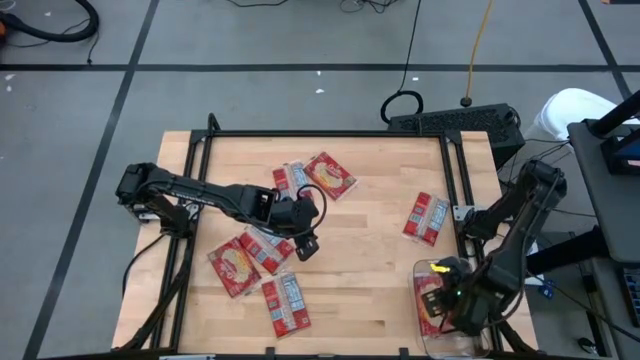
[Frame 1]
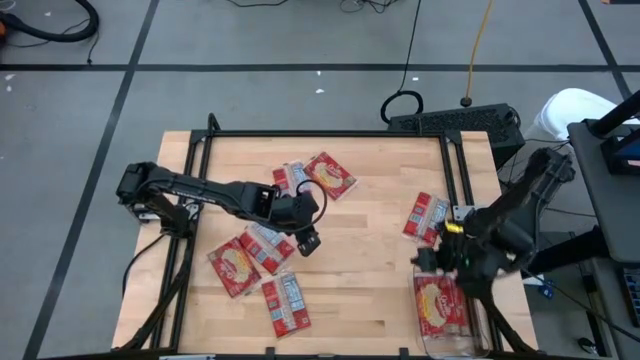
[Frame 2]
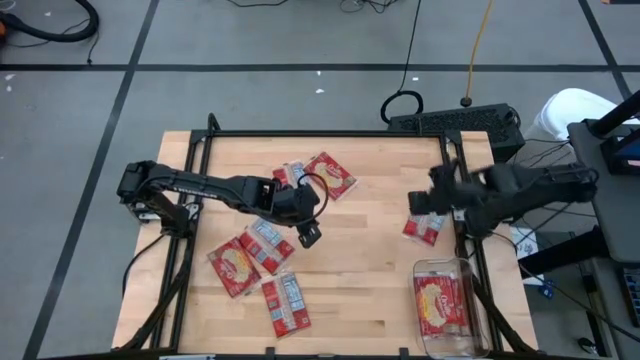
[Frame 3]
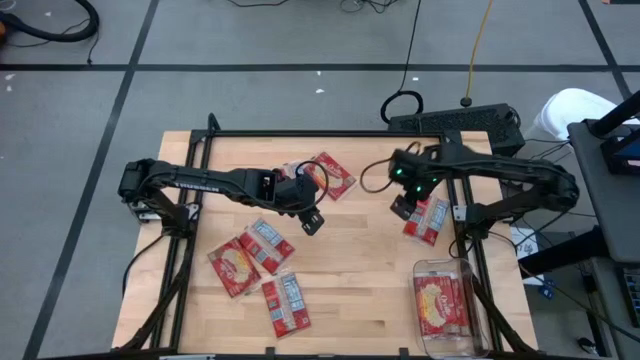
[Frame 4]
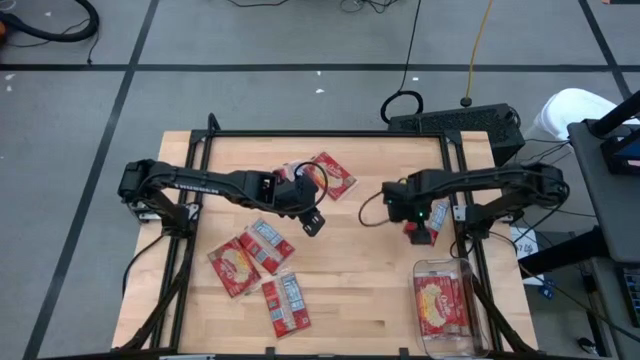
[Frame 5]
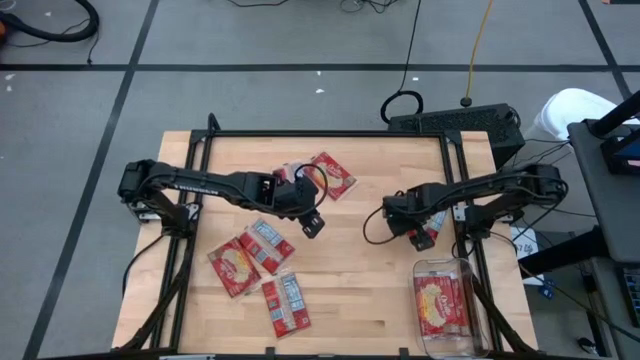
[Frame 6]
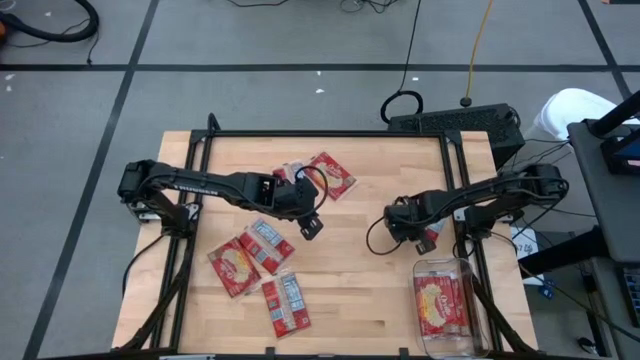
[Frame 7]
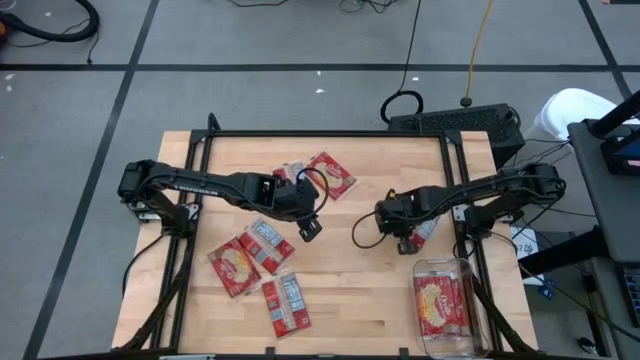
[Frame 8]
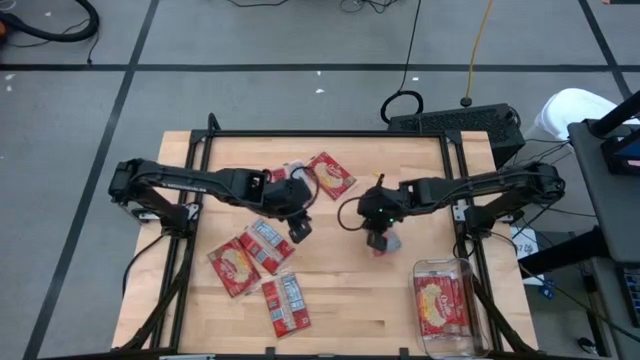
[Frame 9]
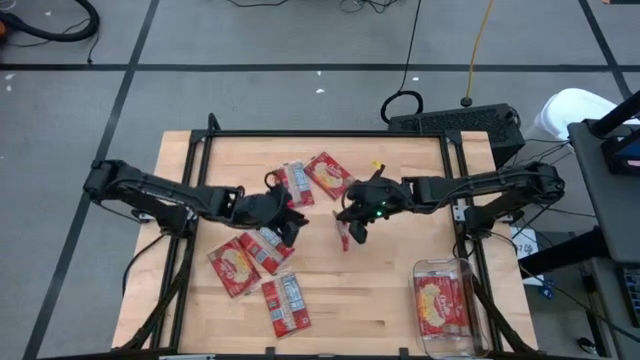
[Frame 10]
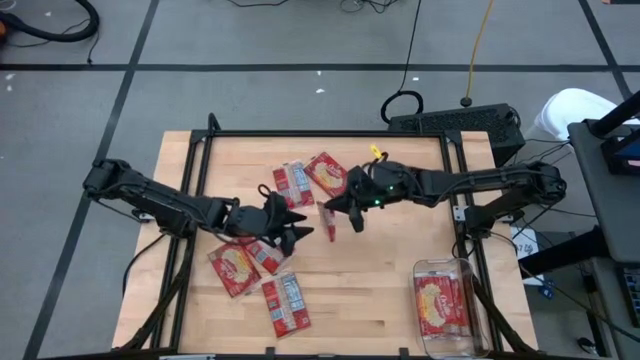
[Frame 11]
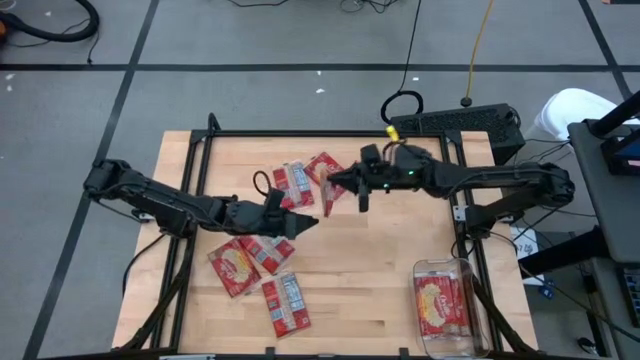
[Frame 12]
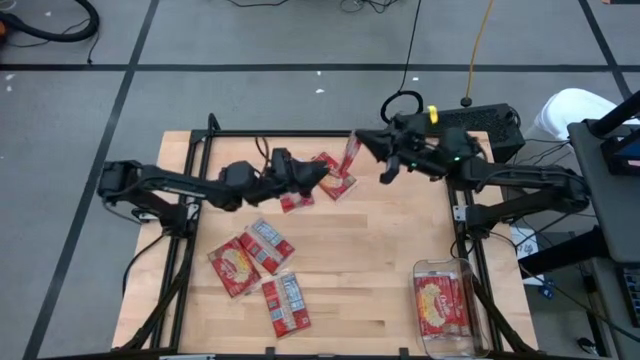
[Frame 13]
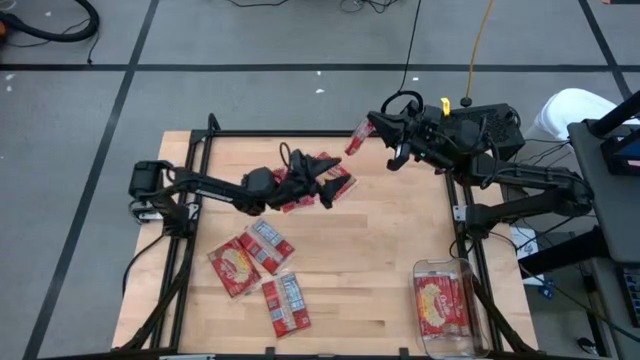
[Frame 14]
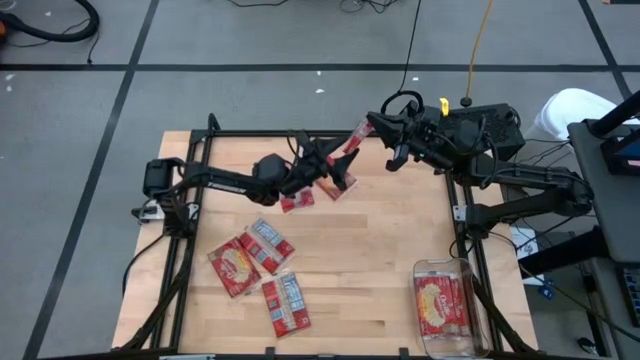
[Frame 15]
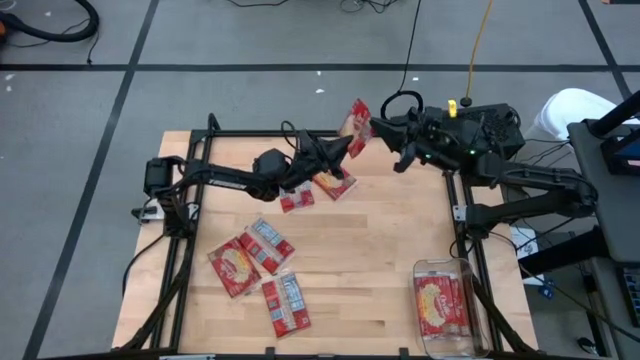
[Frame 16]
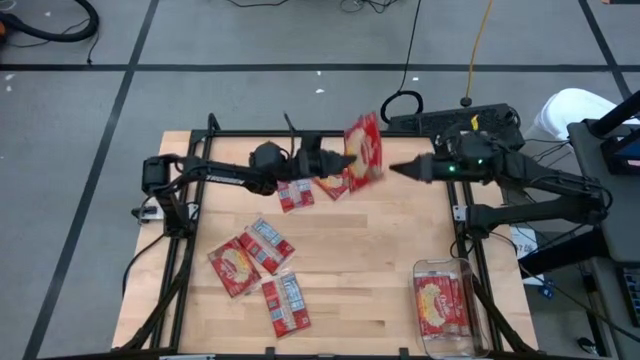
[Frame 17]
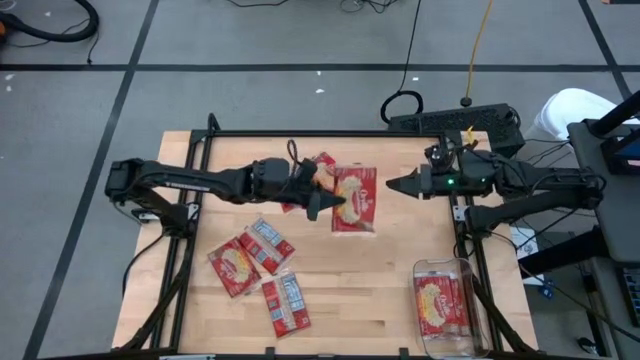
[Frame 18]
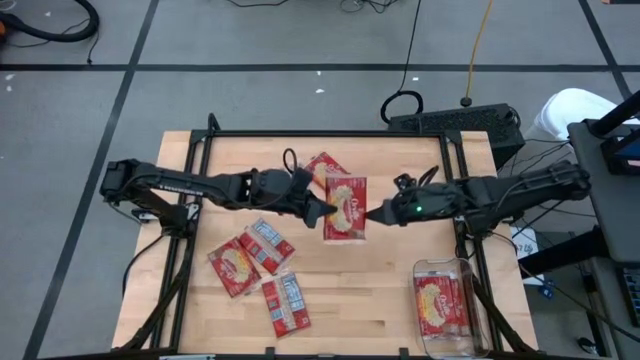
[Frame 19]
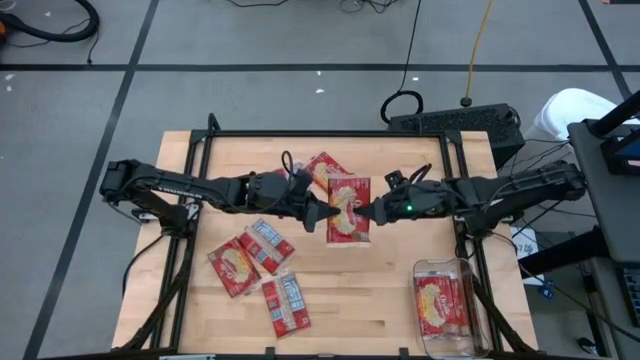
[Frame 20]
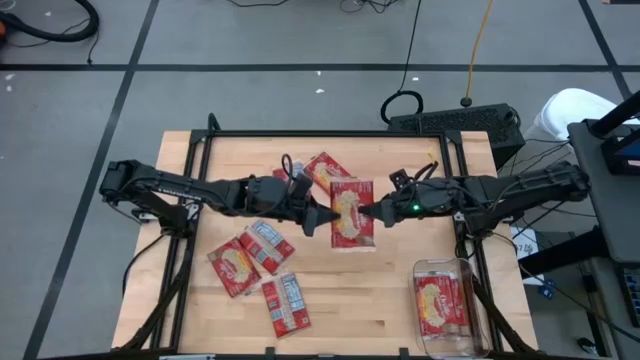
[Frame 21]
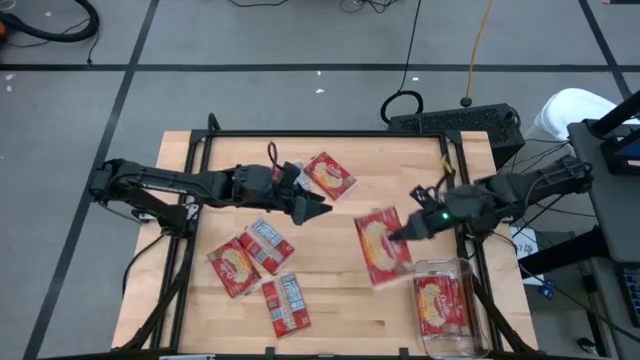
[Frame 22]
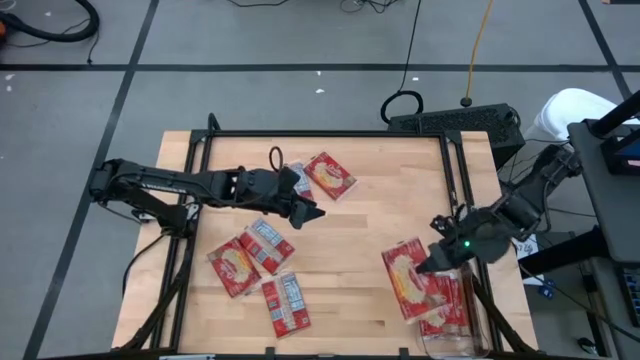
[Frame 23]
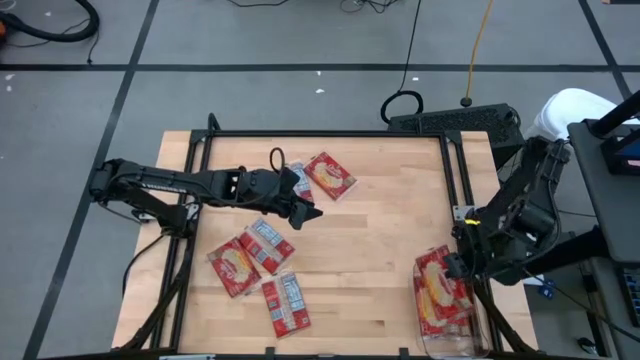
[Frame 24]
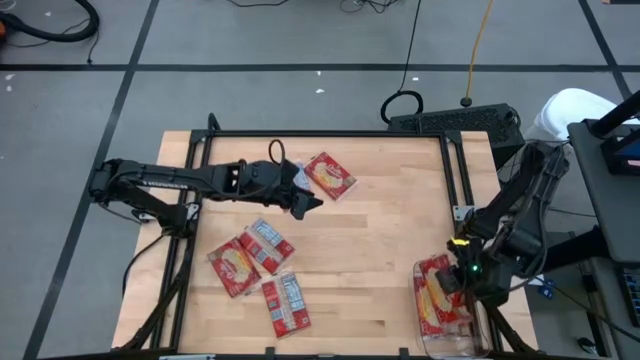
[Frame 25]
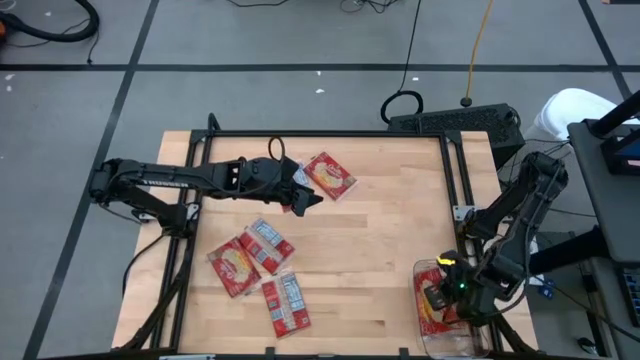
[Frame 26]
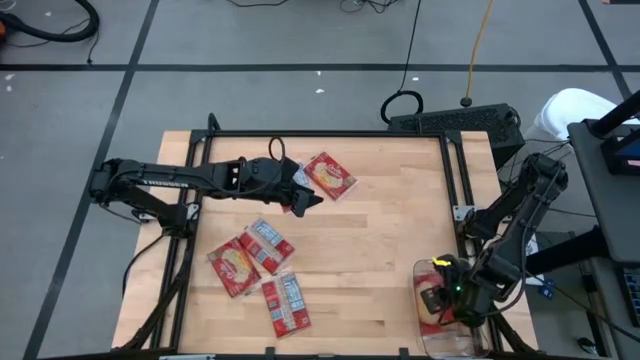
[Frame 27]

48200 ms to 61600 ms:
Task: Sort popcorn bags into baskets
Put the popcorn bag into the transparent bin

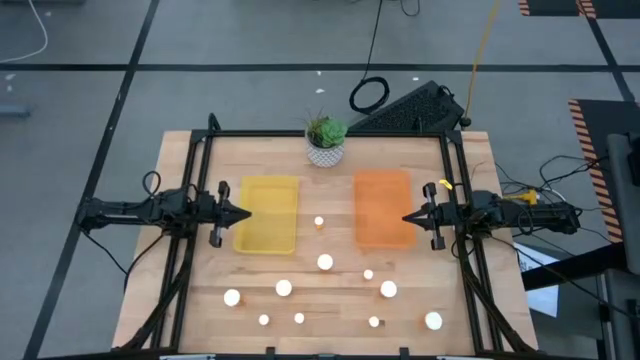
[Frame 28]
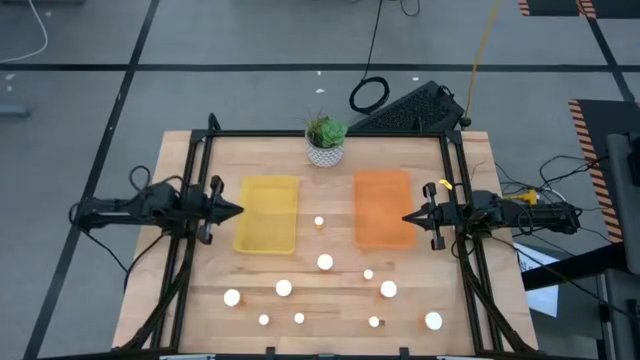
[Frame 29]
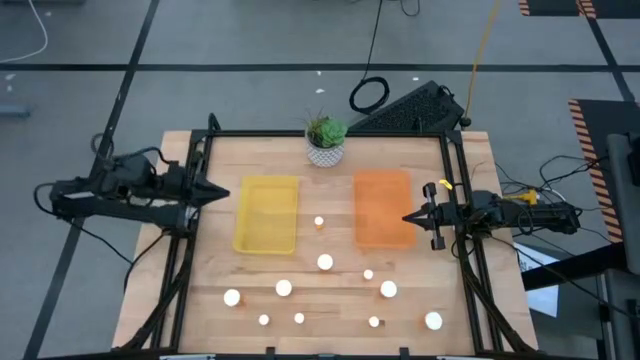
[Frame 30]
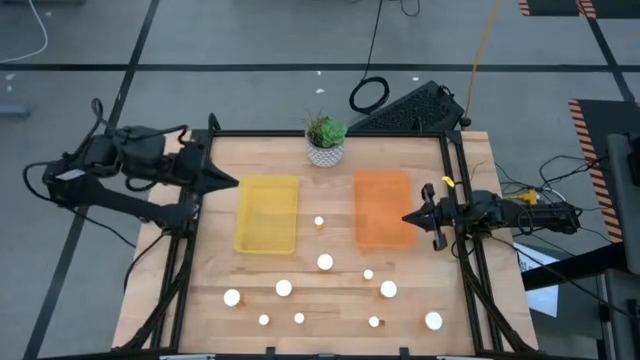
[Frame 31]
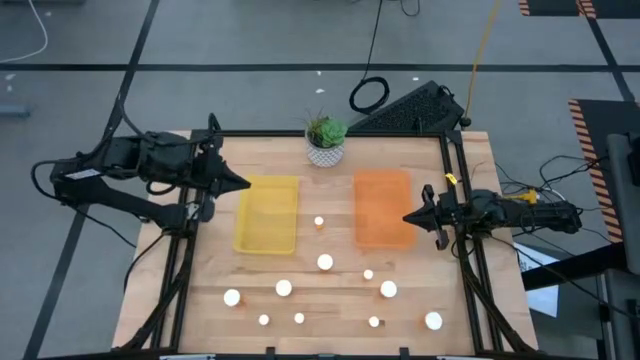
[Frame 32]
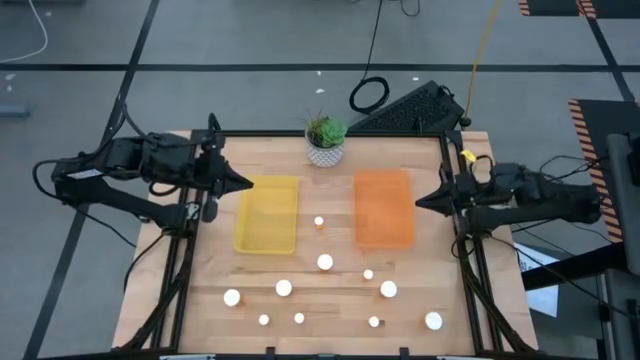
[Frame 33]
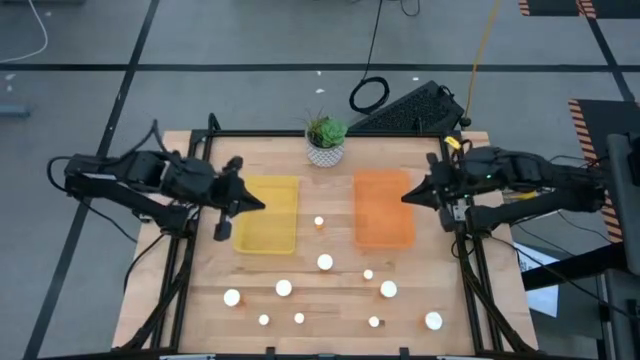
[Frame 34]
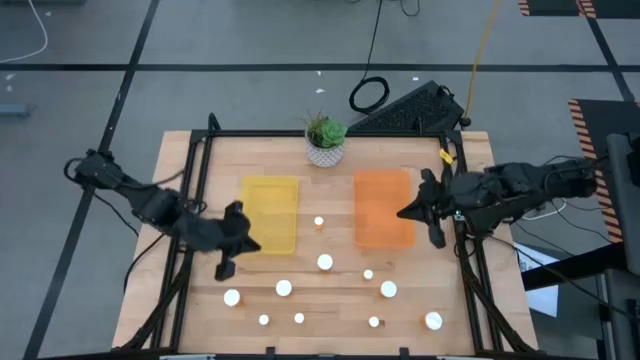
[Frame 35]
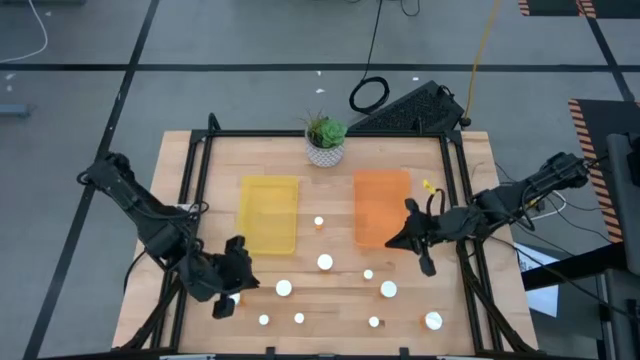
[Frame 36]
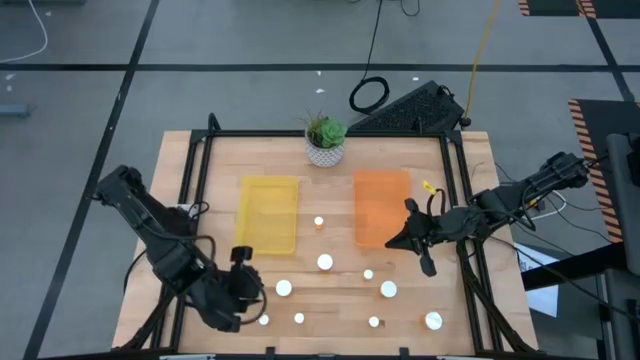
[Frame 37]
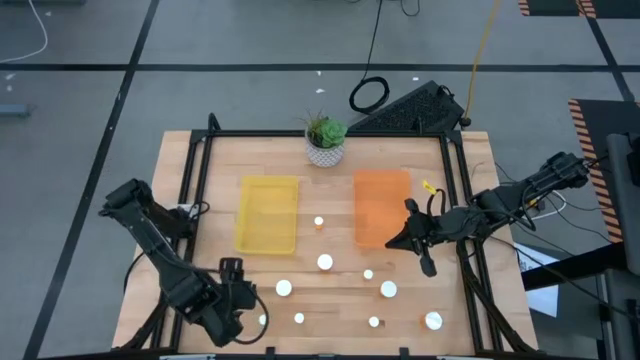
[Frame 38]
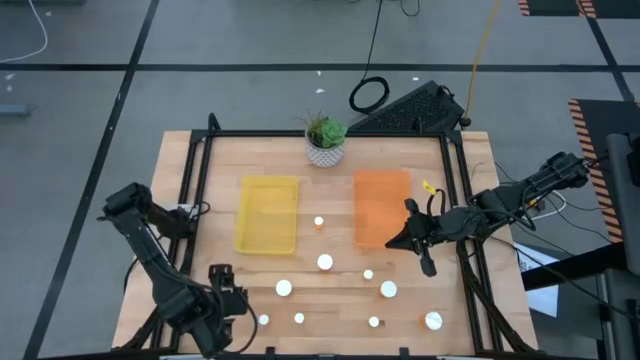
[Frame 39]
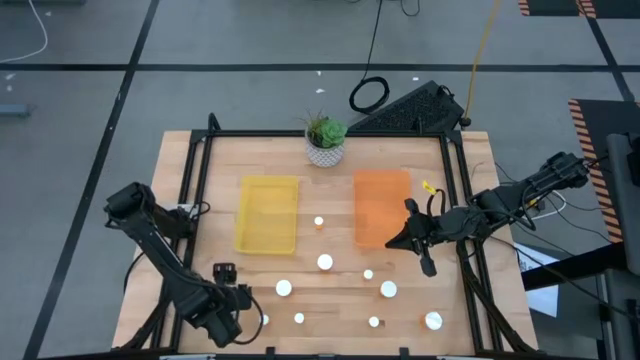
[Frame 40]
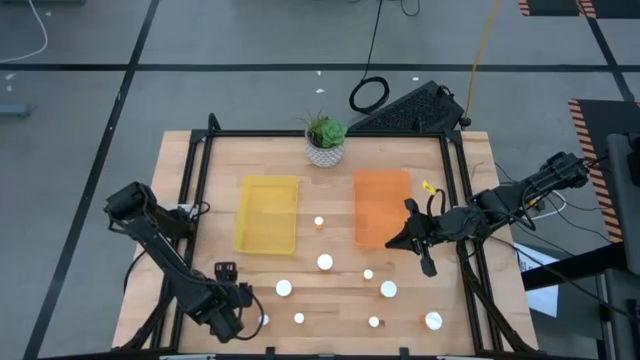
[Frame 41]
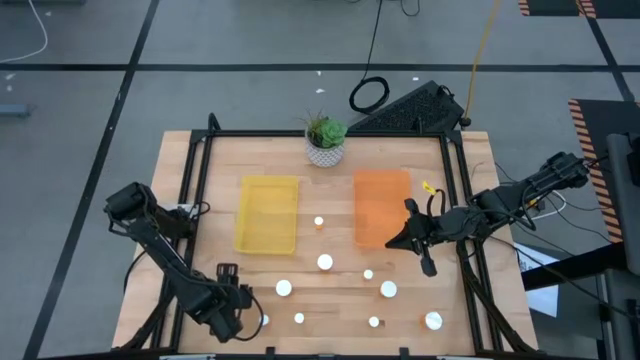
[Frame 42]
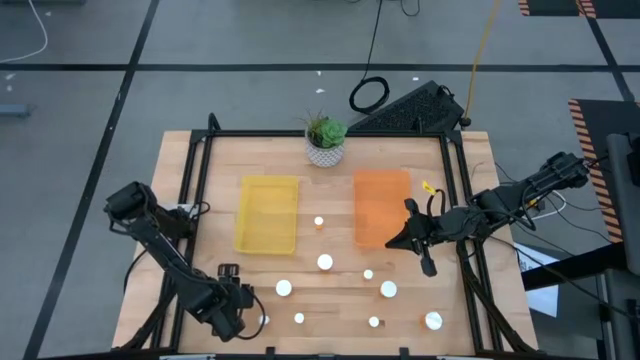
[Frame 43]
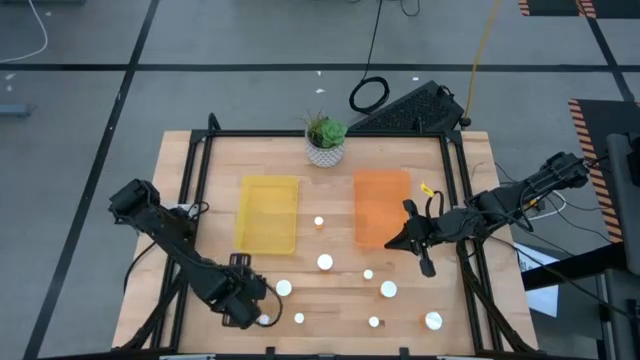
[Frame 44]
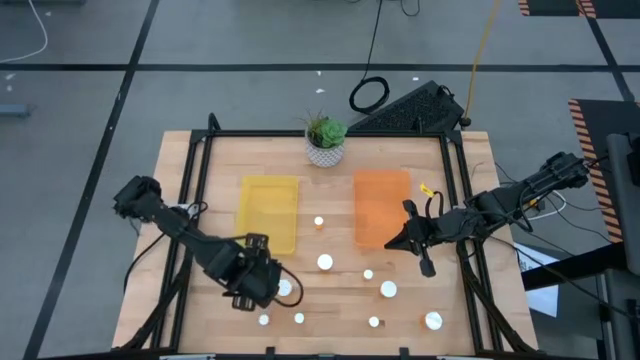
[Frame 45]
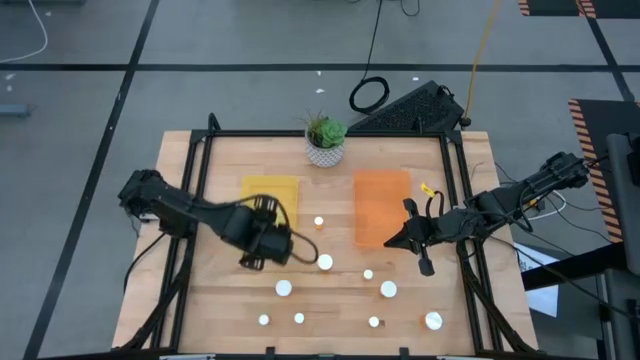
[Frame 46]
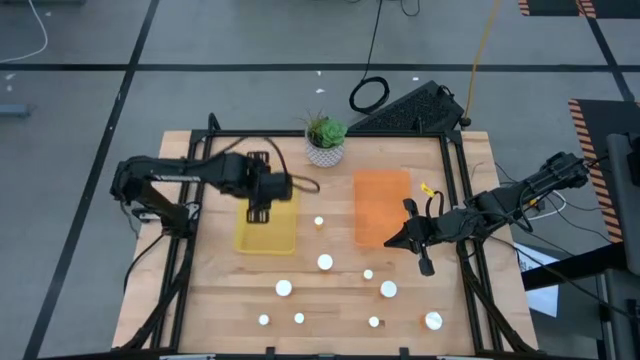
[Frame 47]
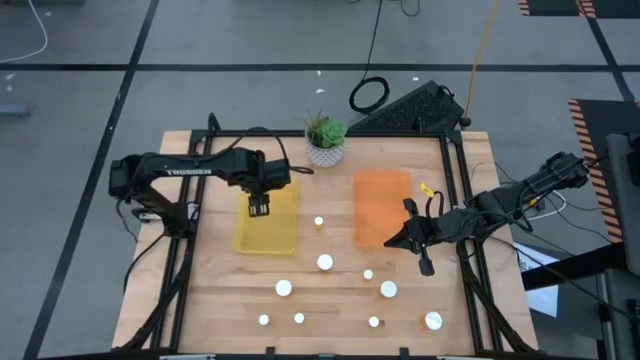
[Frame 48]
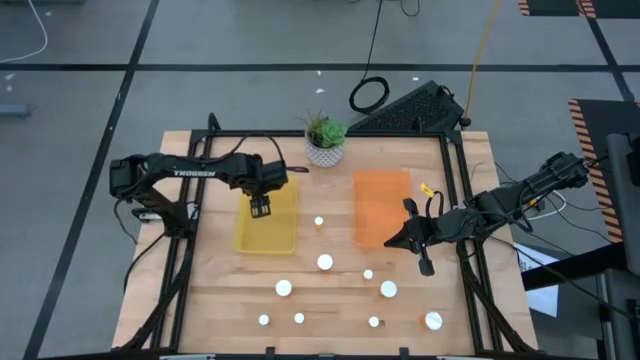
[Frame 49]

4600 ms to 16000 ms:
Task: Pick and place medicine bottles into bin by pill shape (circle, oval)
Put the large medicine bottle into the yellow bin
